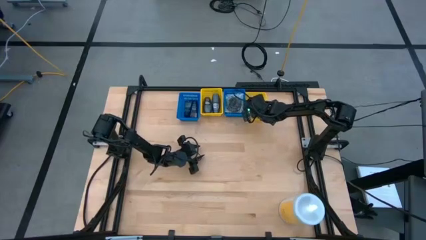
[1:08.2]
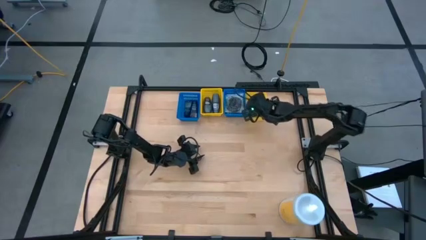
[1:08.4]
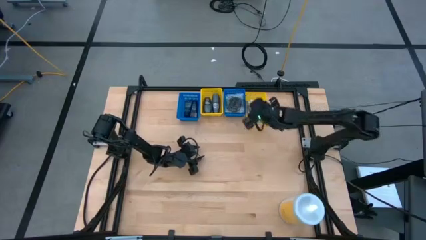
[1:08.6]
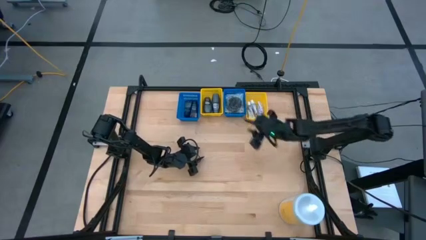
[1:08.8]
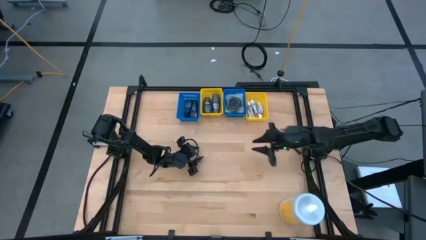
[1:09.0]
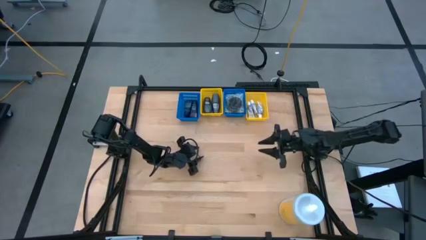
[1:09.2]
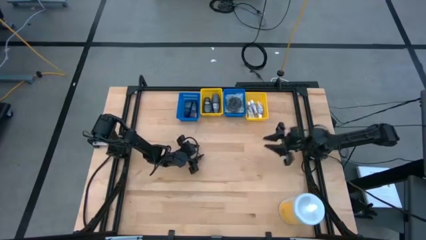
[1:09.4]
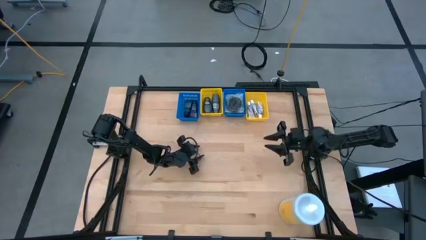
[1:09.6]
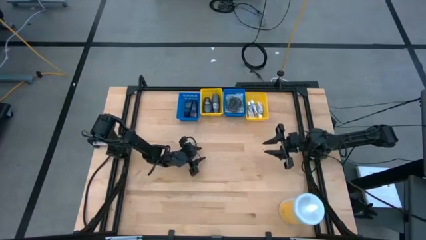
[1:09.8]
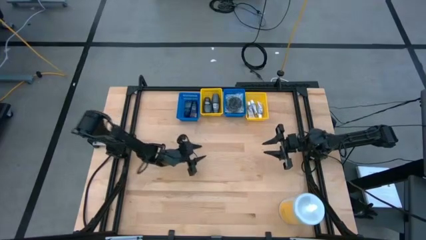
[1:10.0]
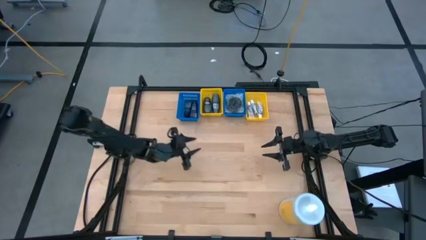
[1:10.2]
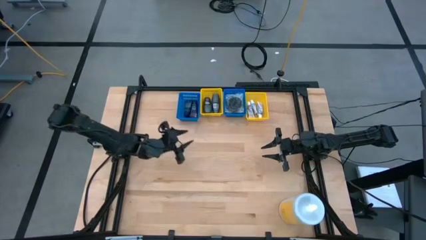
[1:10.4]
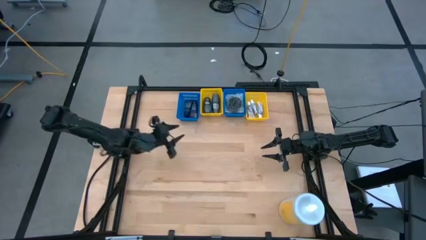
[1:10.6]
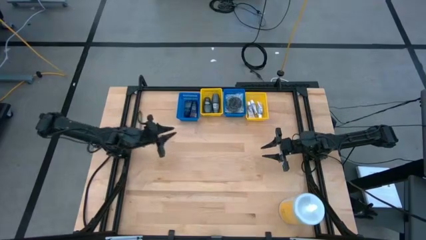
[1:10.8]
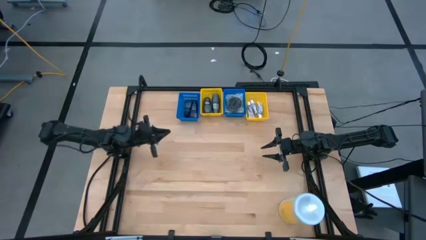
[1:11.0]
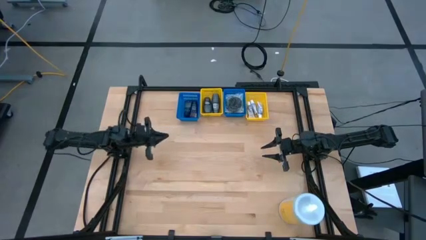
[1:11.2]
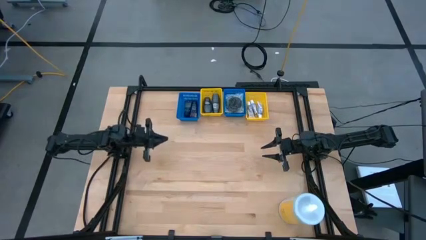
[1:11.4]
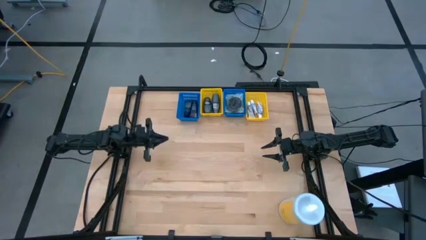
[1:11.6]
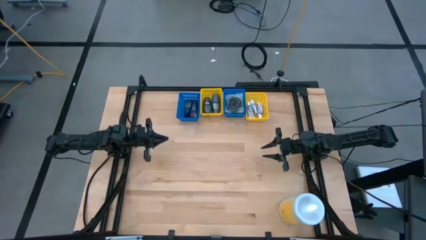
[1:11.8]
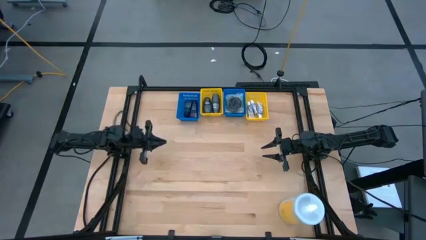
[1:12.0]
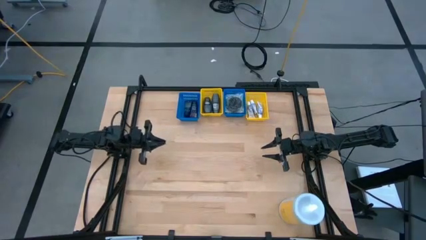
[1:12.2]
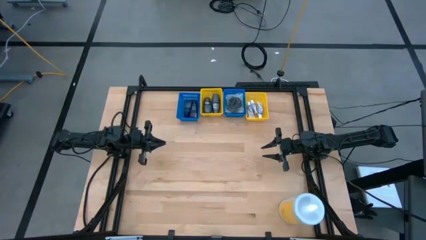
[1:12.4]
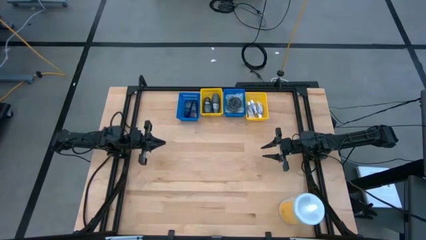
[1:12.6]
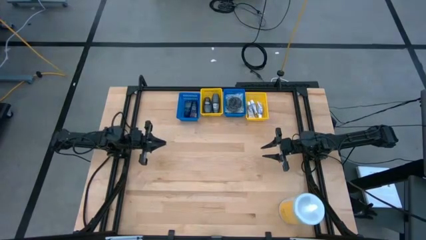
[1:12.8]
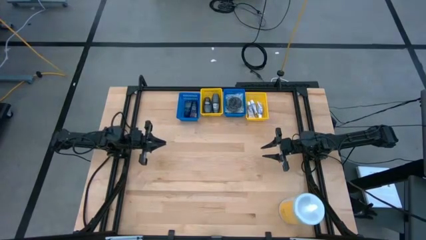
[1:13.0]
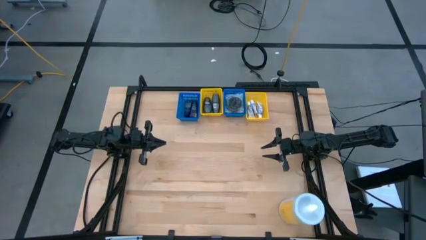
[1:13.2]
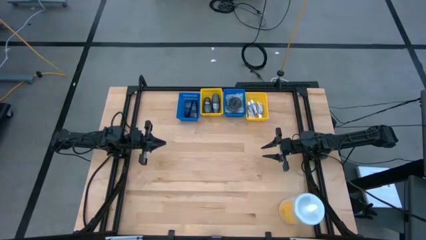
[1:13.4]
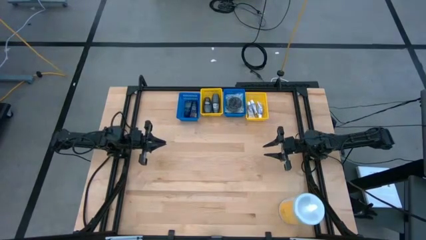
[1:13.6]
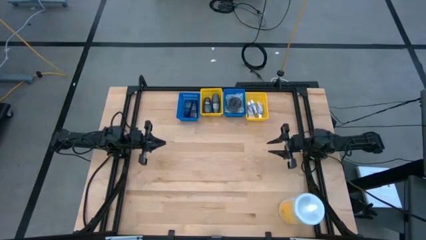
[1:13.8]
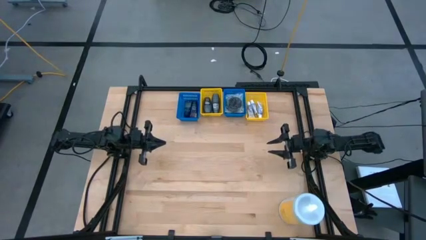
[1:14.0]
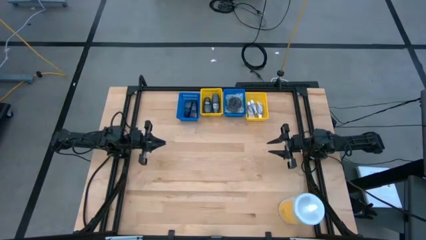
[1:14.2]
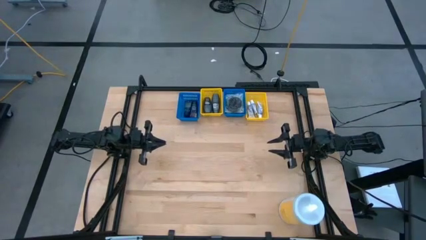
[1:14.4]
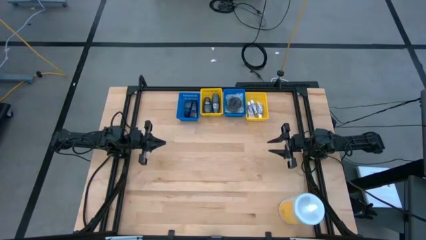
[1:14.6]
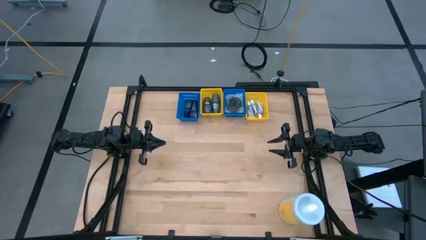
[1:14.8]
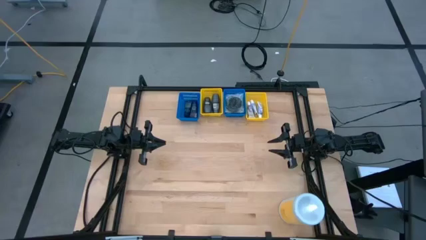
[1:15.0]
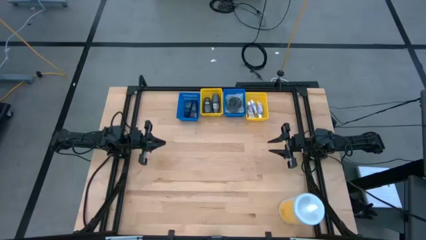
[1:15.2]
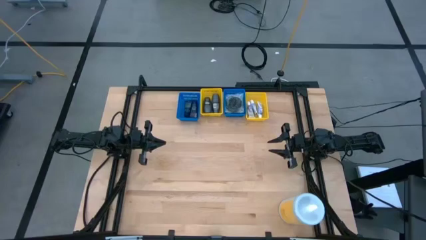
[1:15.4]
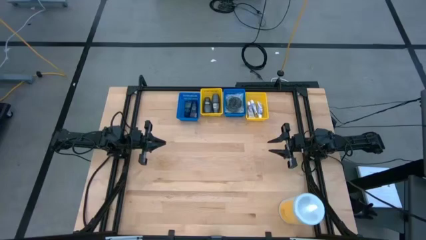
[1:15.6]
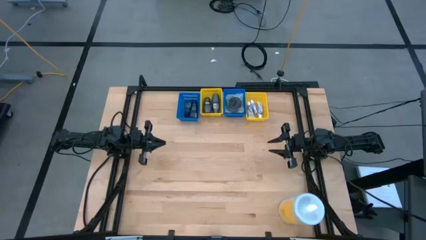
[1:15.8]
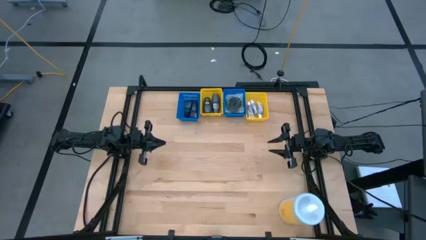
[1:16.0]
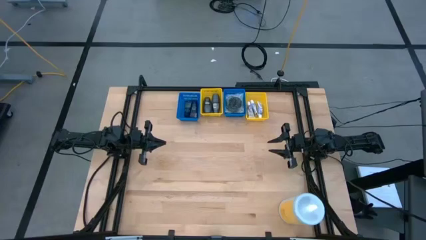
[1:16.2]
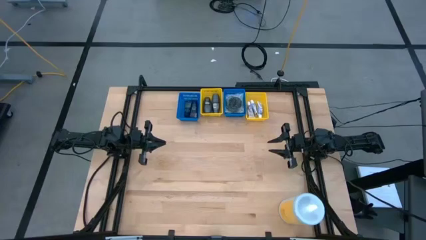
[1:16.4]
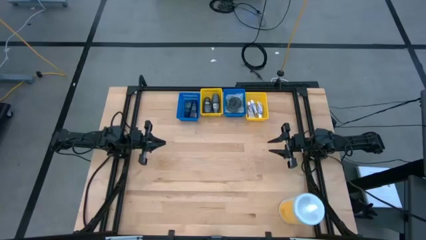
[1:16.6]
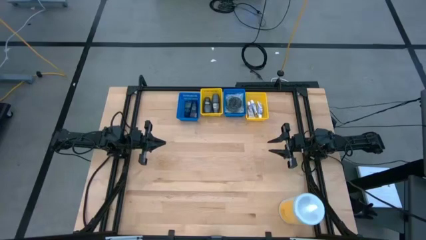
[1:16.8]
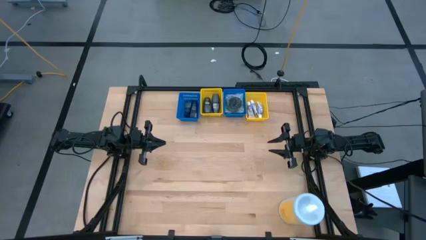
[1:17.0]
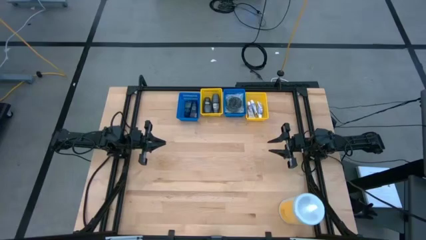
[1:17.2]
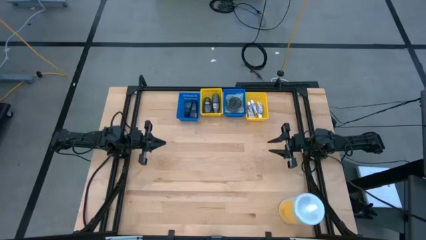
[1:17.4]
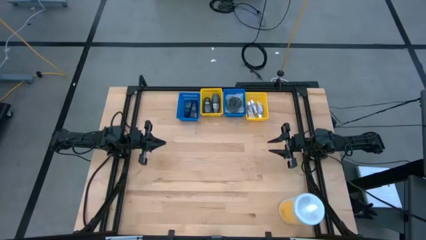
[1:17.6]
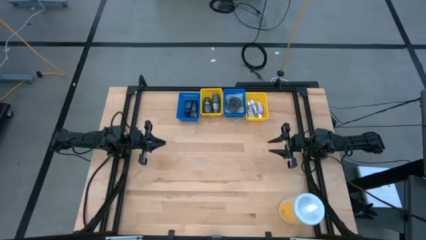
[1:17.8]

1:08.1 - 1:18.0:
Task: Pick & Place Travel size toiletries
Return to Home Position

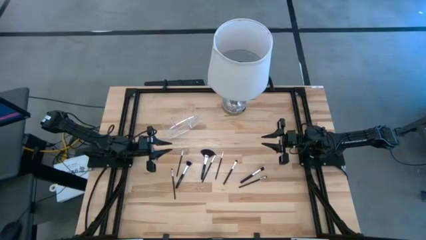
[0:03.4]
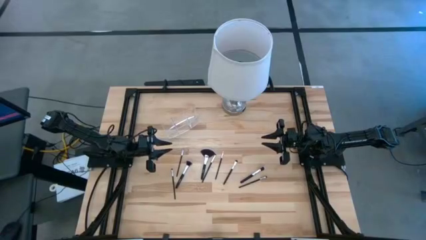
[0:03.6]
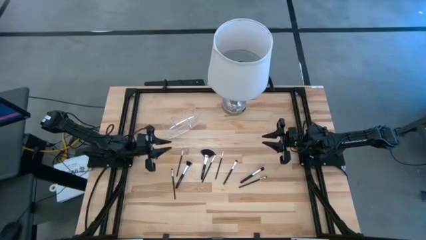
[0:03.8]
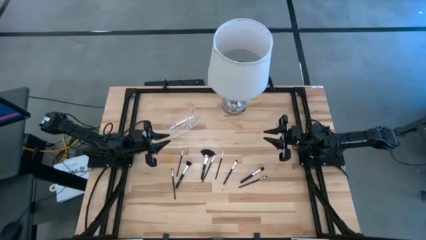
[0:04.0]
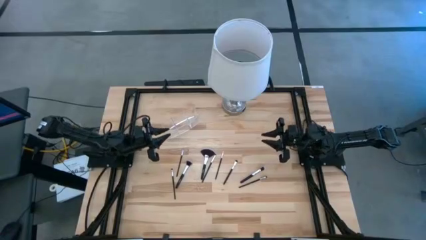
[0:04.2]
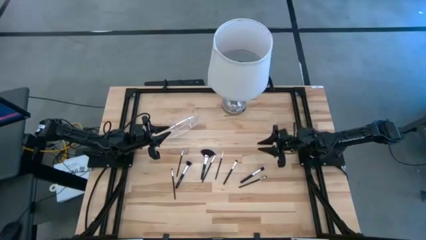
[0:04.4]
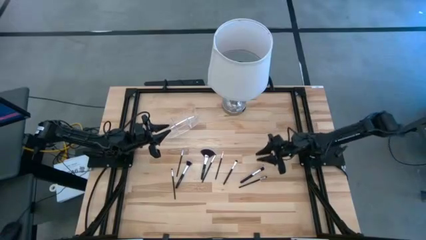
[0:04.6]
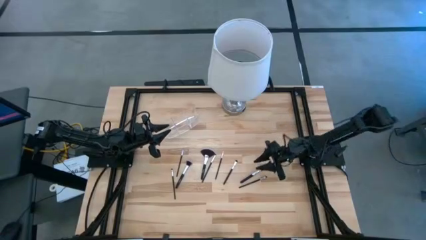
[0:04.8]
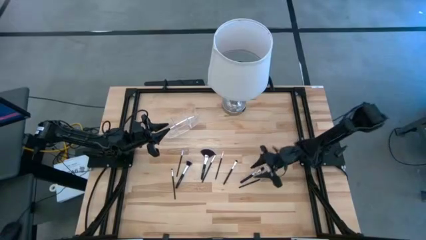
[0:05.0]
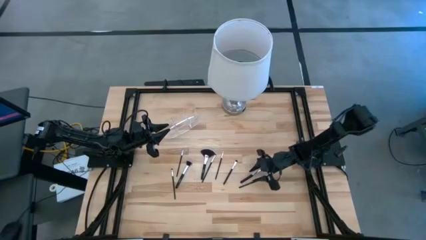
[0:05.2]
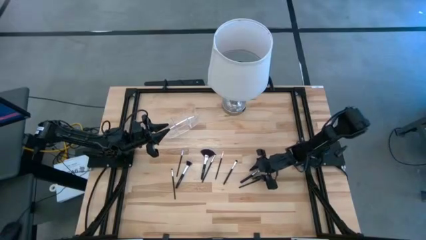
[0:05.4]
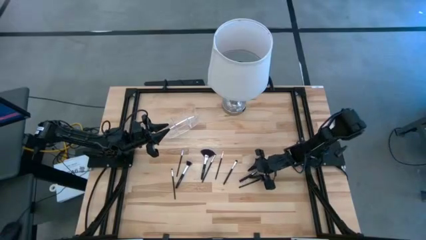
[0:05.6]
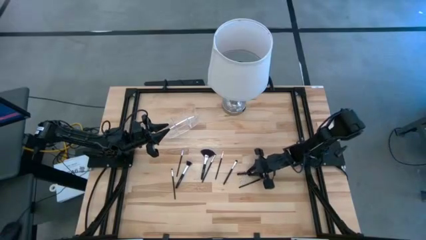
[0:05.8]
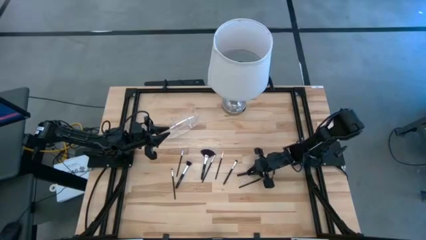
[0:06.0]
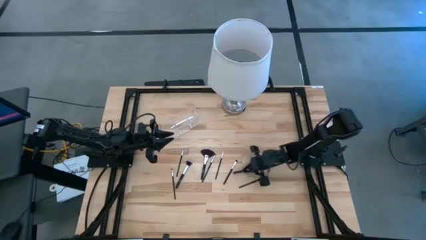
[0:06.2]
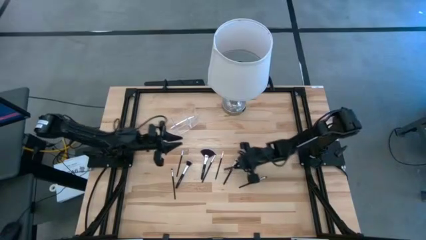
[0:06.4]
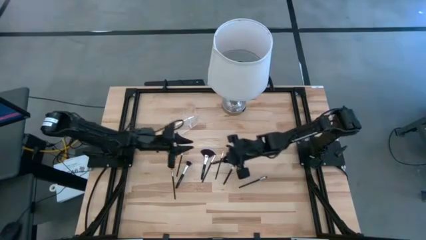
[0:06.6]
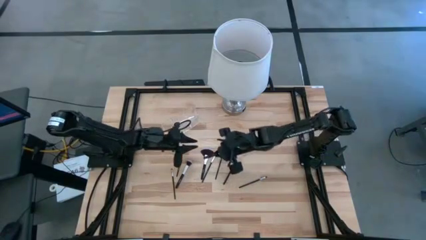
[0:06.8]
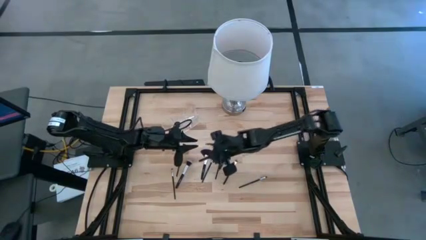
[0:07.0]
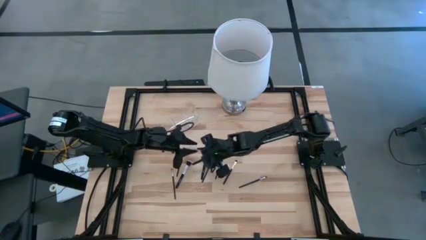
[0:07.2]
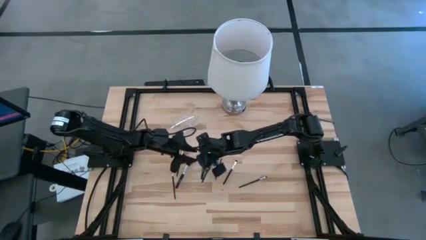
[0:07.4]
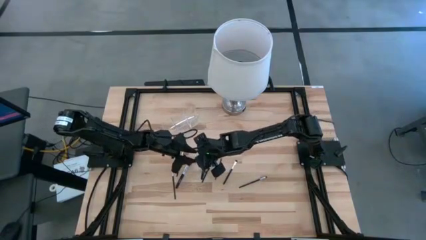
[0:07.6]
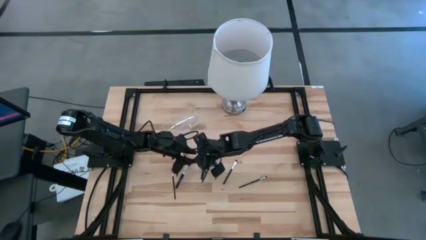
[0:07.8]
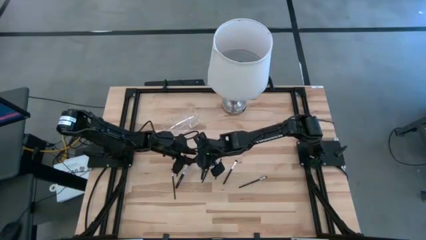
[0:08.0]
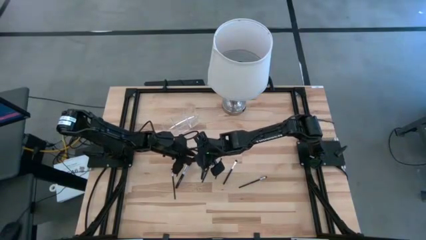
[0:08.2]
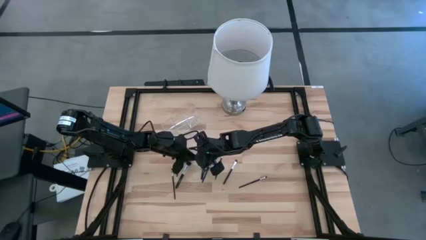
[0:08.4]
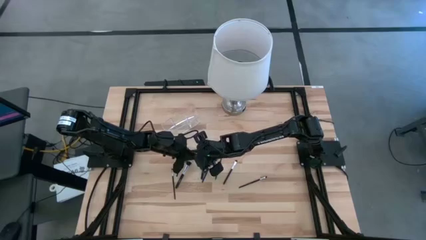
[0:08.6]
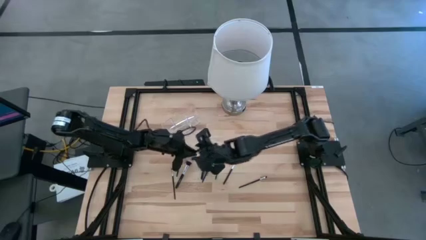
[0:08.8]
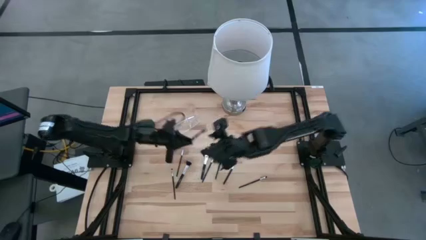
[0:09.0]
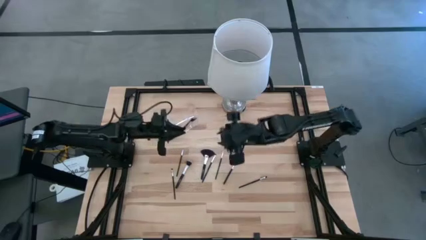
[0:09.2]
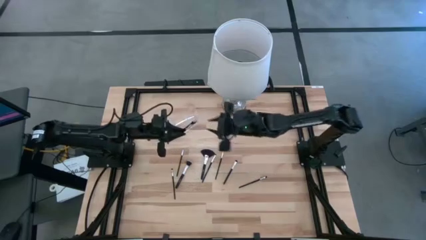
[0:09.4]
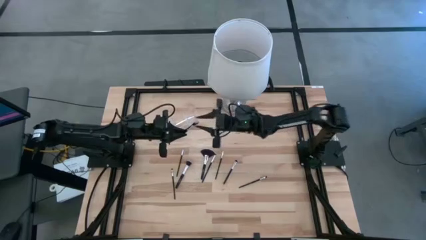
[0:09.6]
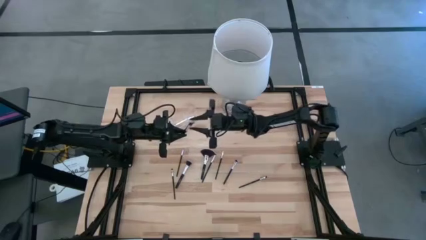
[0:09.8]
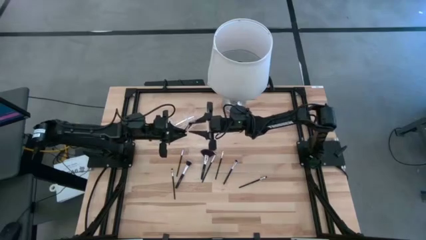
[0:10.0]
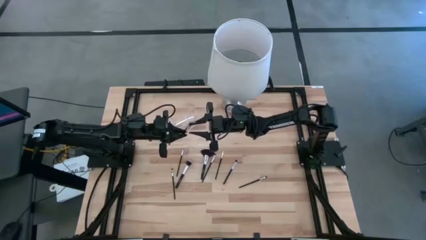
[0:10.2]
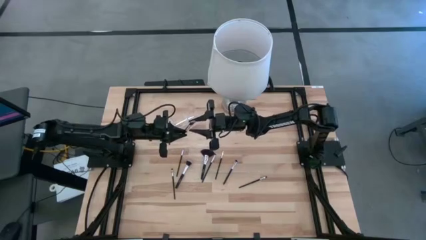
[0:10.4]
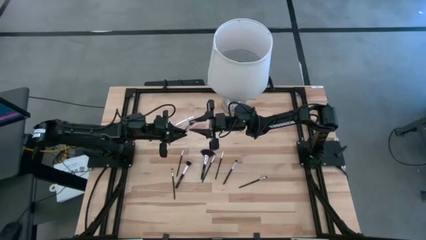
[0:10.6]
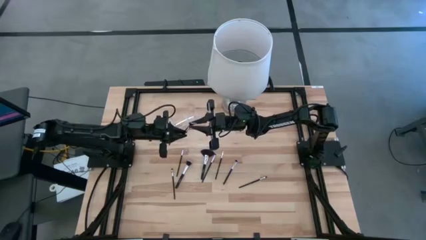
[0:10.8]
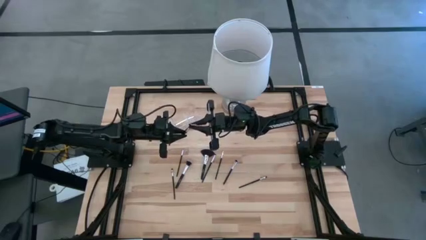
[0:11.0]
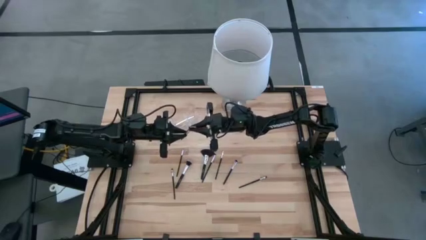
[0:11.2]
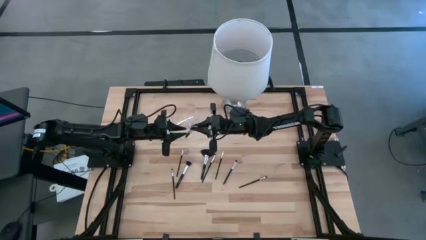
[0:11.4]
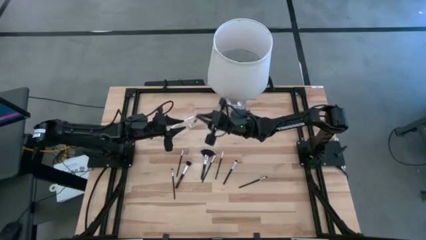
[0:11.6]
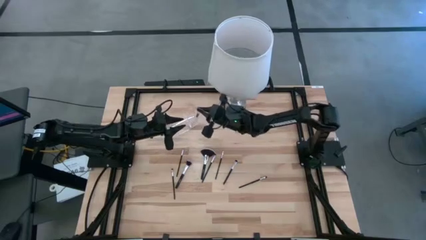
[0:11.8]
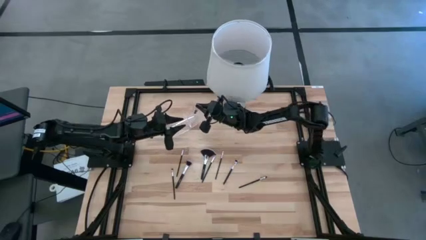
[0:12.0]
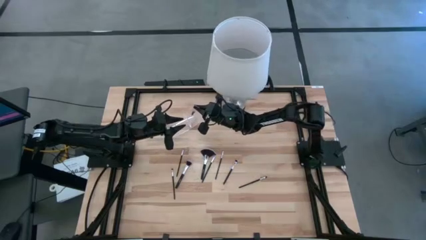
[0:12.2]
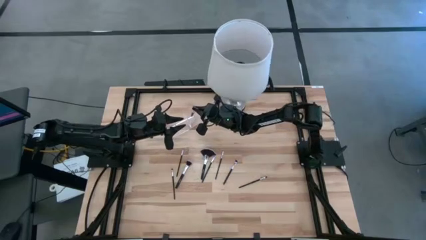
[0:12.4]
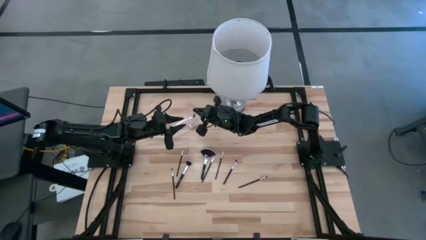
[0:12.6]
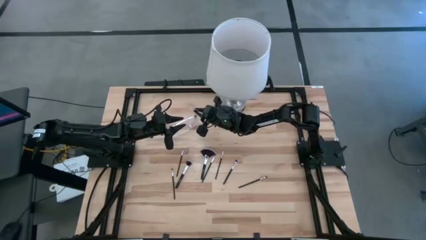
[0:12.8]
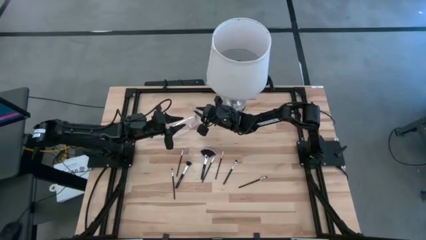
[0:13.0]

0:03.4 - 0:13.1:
Task: Put items in baskets/containers
Put the black blush brush into the transparent organizer
